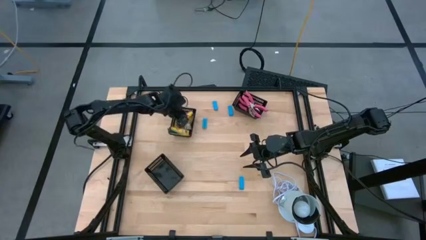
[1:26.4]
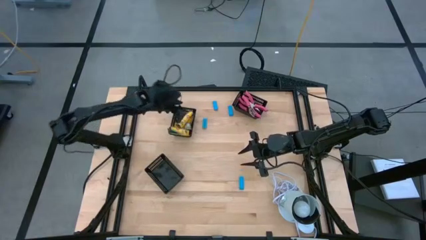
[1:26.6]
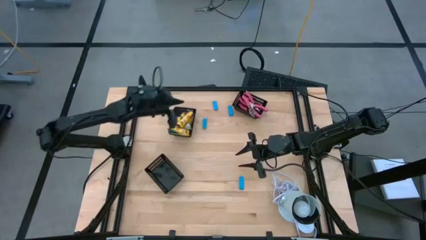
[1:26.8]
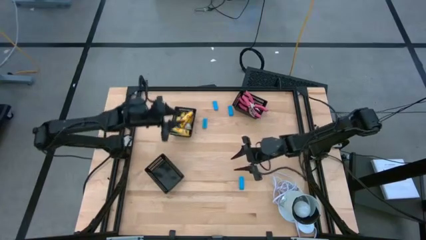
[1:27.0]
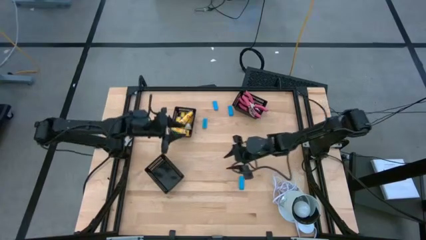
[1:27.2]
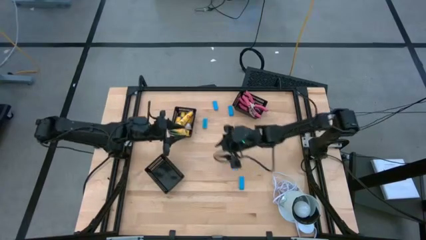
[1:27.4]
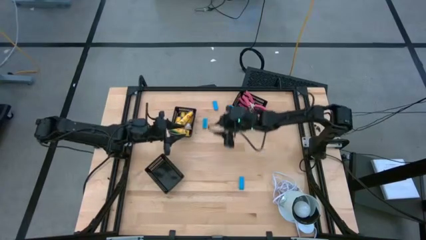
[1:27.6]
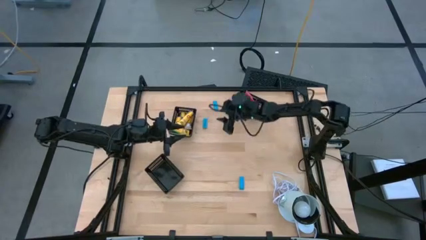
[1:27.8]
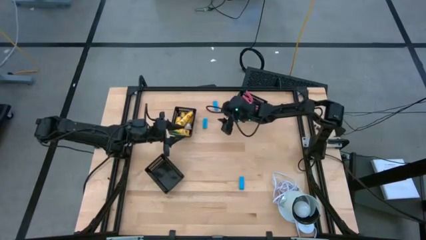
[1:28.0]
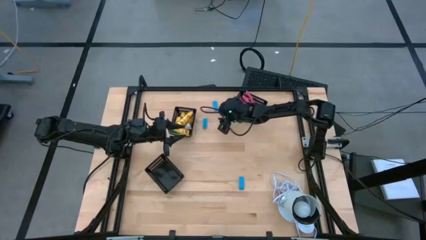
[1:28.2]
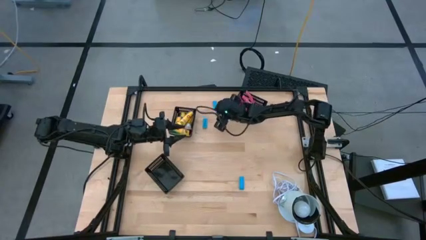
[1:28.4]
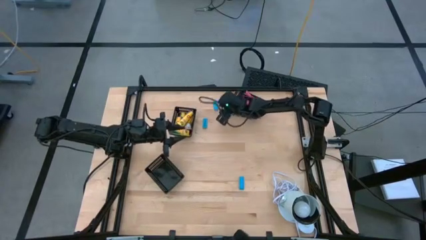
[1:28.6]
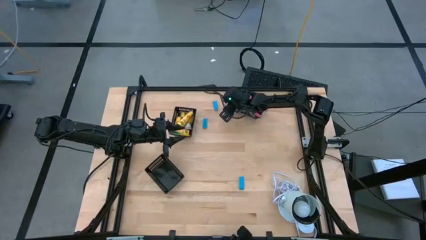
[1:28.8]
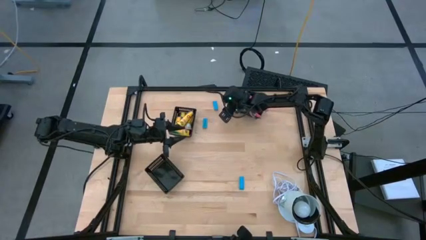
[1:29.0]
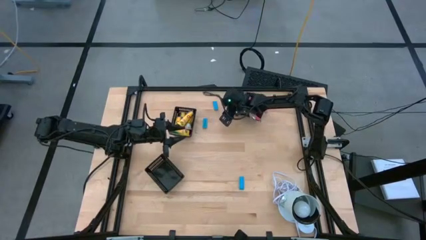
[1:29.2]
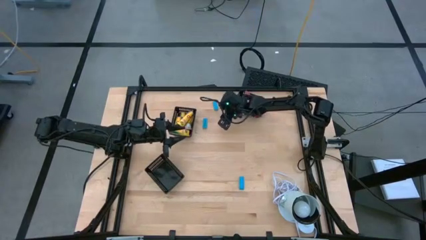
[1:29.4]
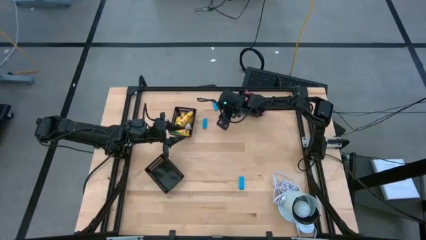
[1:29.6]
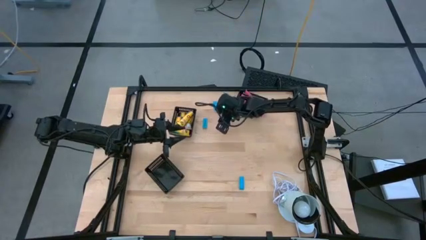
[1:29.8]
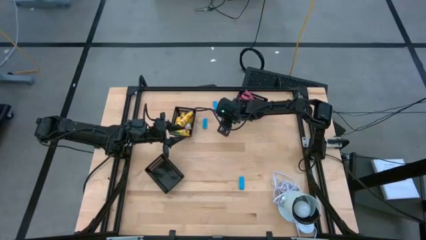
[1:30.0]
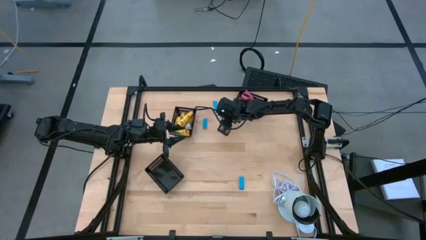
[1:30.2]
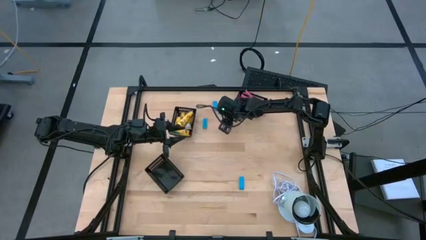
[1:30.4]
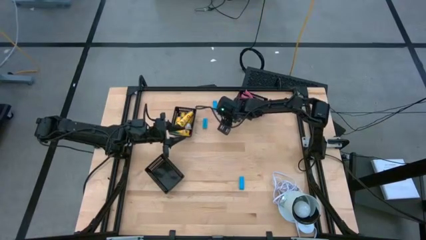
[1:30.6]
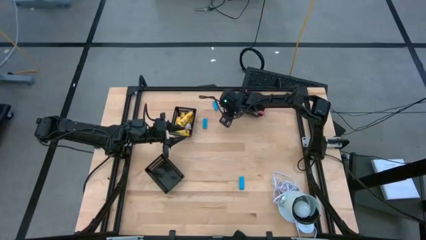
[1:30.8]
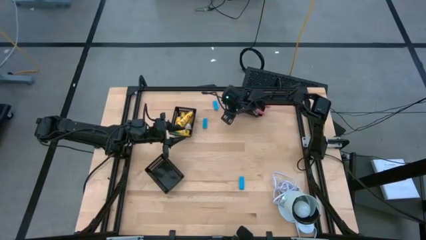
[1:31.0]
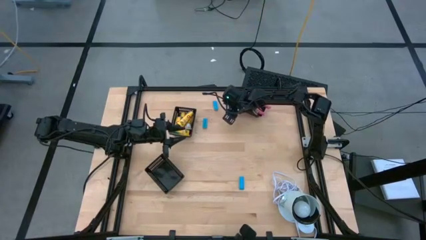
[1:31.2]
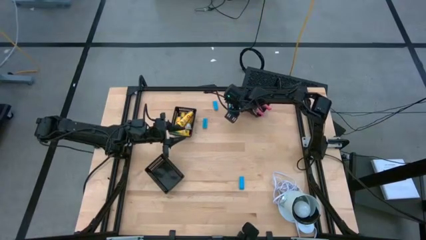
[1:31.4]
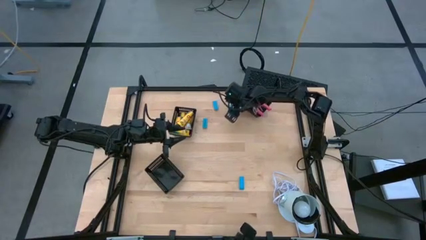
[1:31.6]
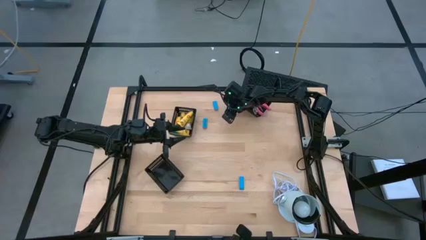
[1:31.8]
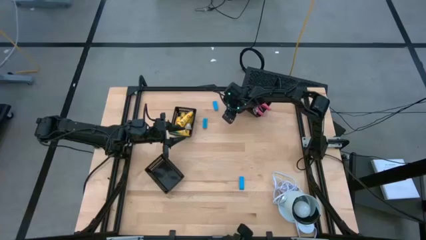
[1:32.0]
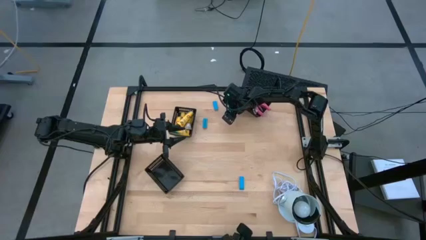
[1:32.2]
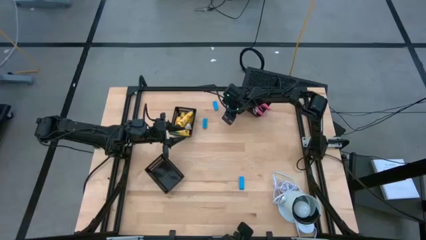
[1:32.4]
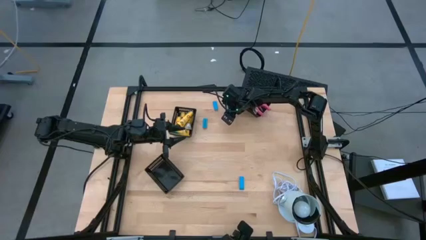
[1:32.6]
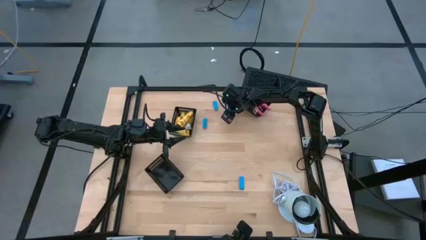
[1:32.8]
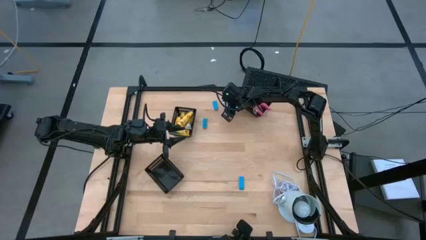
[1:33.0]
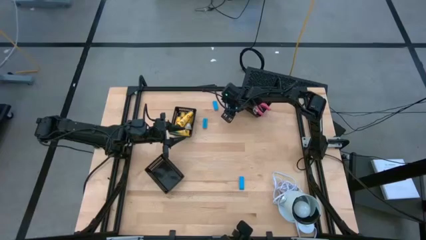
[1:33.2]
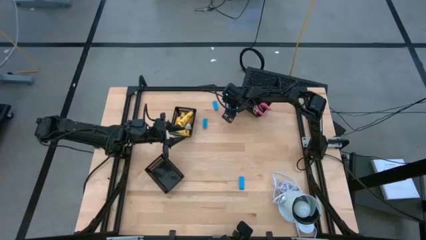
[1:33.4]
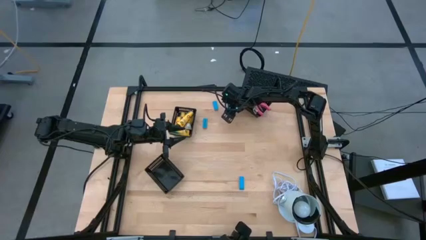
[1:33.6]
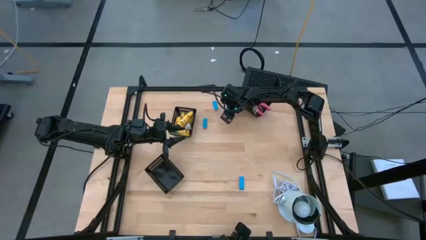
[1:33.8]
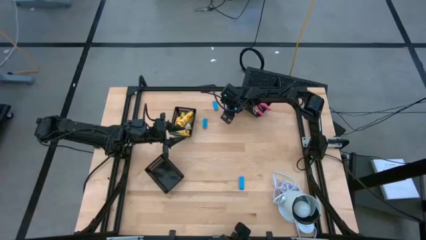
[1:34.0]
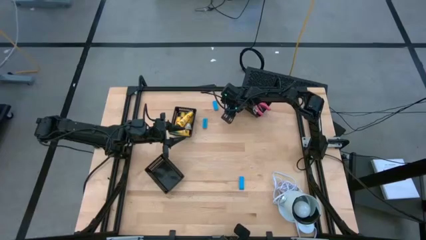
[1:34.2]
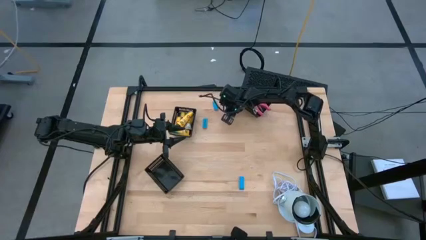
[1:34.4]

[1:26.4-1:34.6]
Task: Pick & Place School Supplies
Put the blue eraser into the bottom black bin

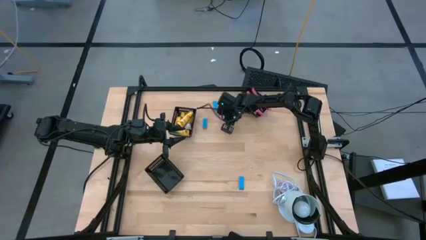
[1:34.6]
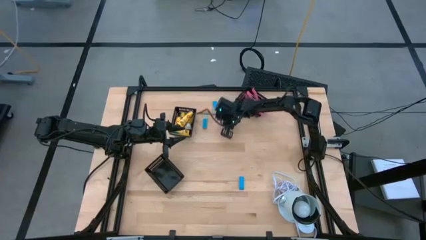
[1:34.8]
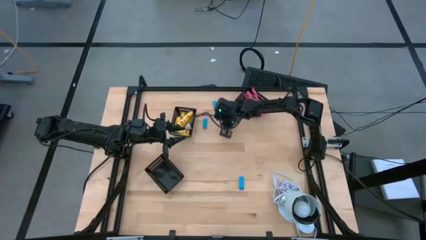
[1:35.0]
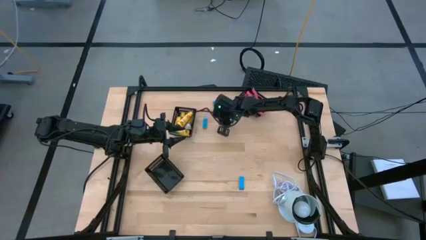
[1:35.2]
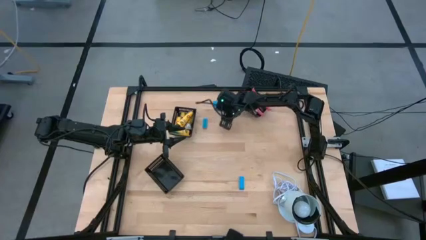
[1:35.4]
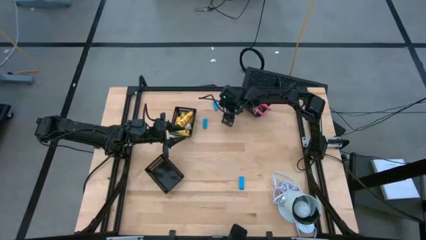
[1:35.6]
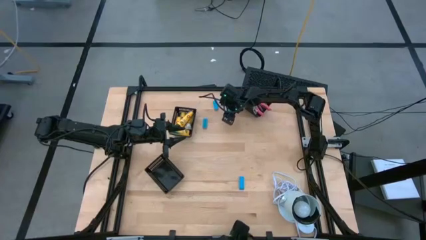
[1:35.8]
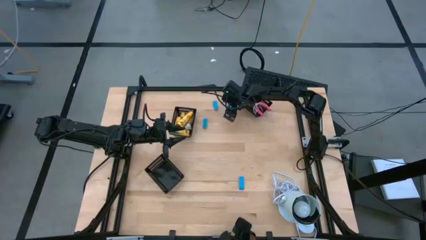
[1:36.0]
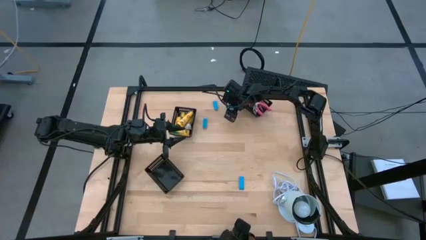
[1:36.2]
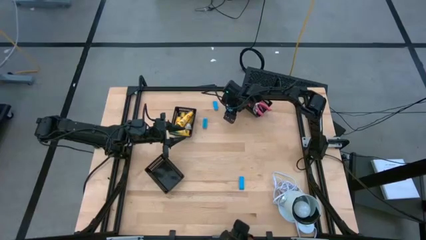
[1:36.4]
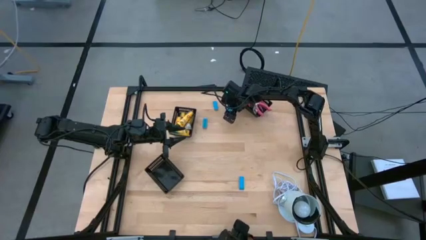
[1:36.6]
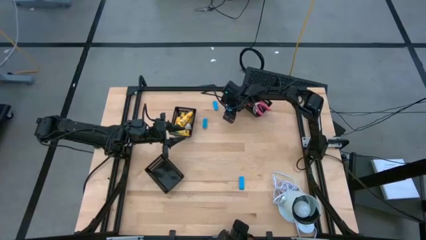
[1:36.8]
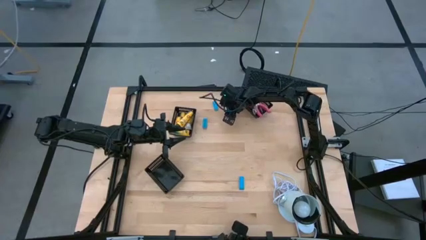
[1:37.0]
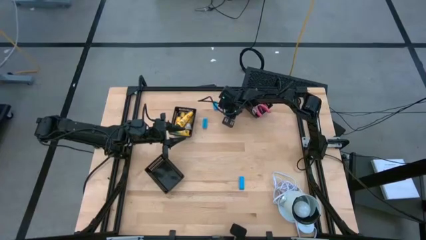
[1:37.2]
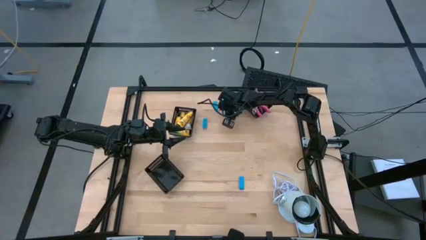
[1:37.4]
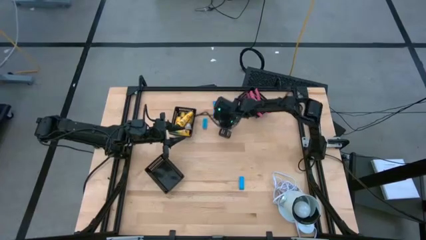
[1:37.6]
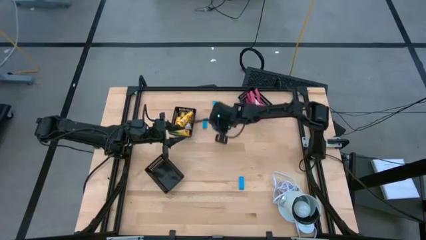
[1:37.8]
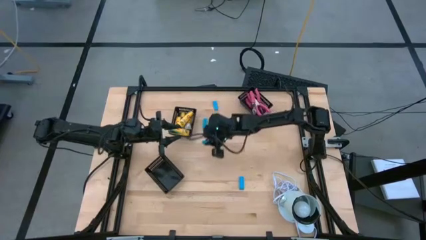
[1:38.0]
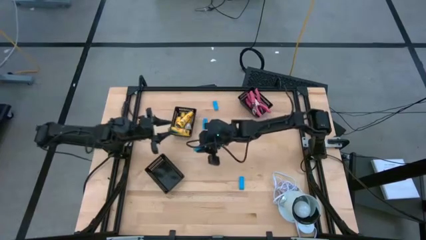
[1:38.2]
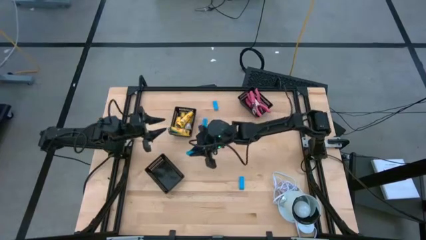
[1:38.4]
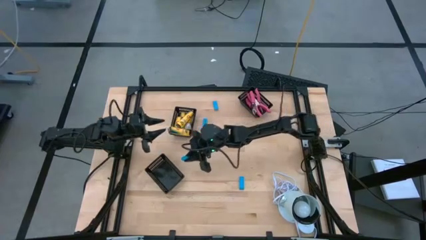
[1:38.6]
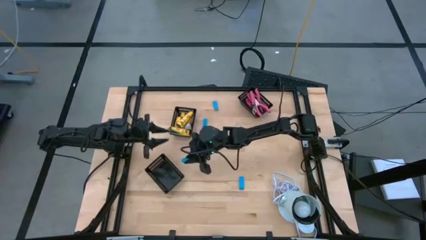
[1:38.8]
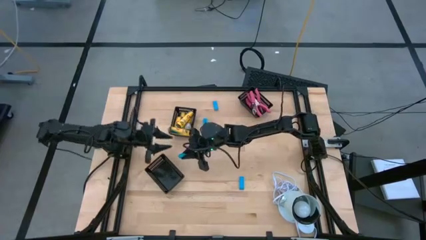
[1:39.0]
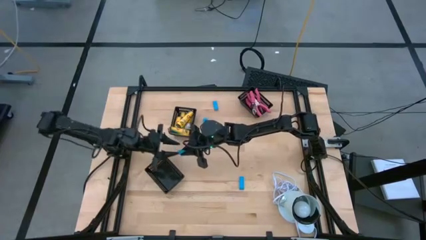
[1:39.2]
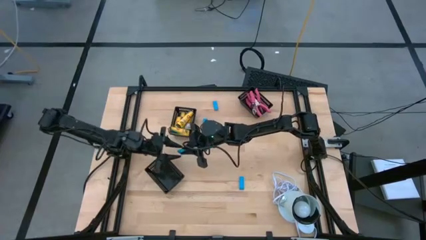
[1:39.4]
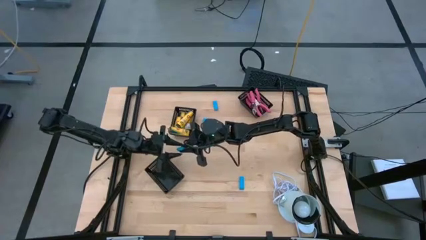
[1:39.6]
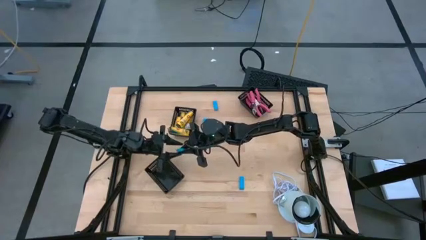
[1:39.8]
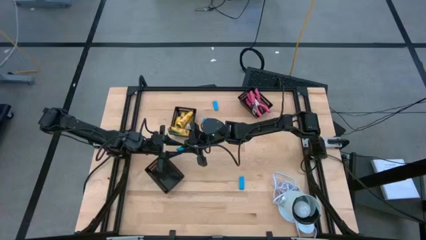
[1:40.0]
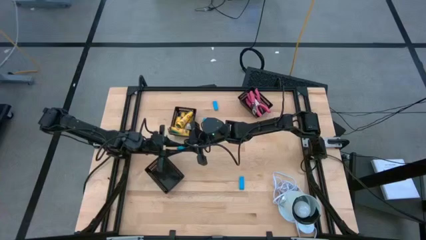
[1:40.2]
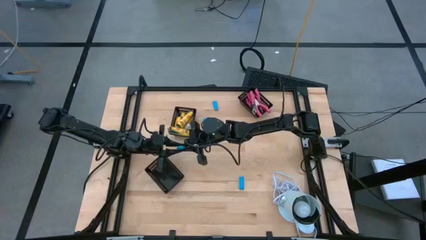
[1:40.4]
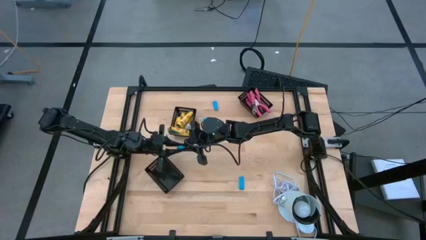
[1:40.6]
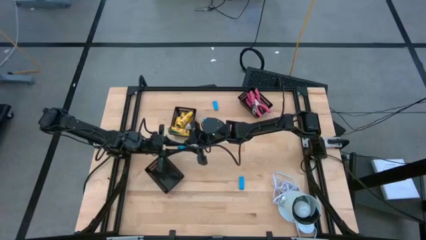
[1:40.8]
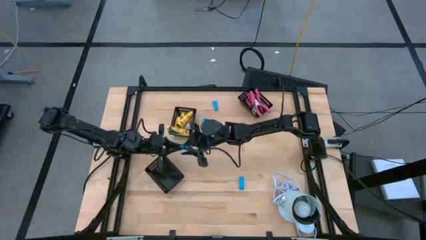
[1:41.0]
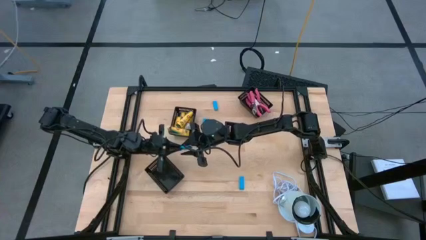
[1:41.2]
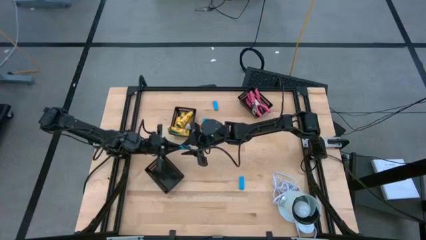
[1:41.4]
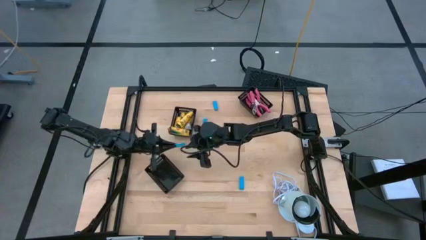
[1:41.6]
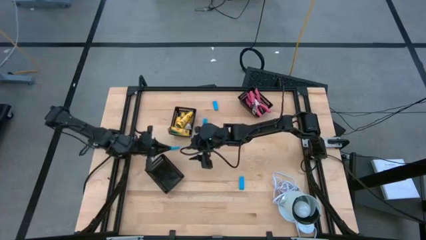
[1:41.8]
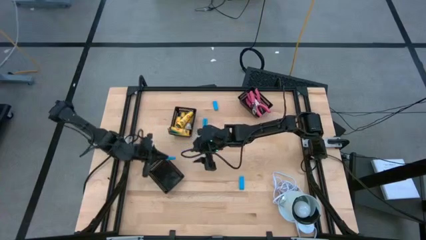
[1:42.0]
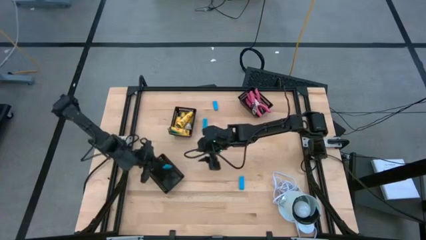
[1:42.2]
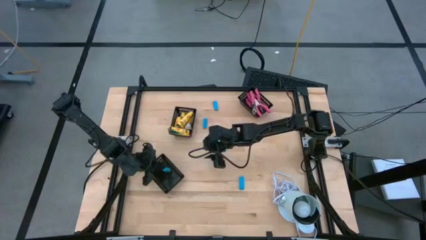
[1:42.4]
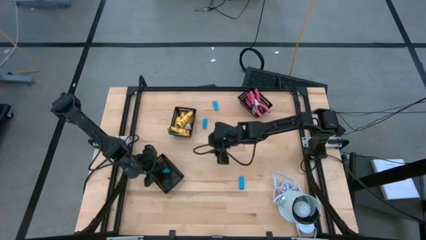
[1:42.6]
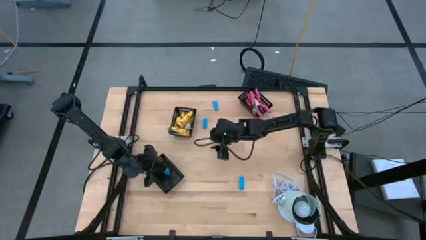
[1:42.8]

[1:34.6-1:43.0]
Put the blue eraser into the bottom black bin
